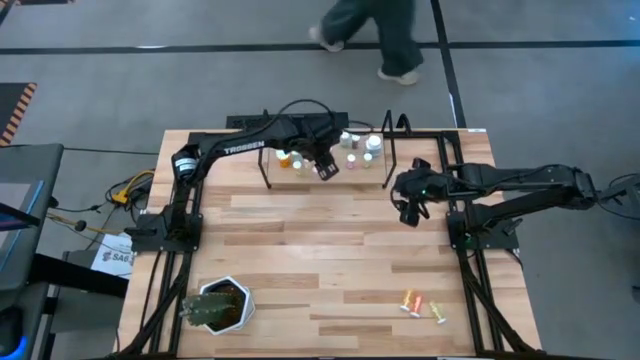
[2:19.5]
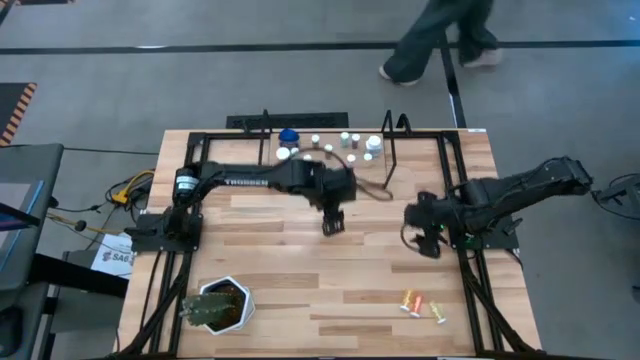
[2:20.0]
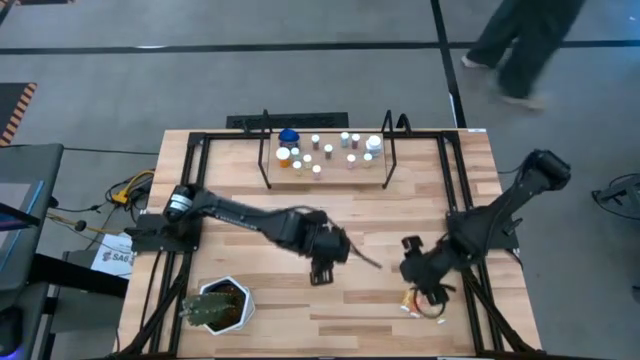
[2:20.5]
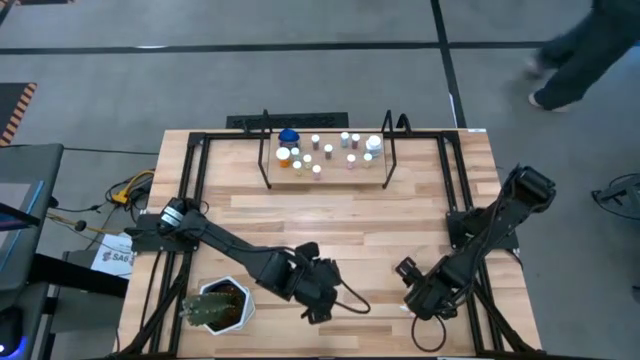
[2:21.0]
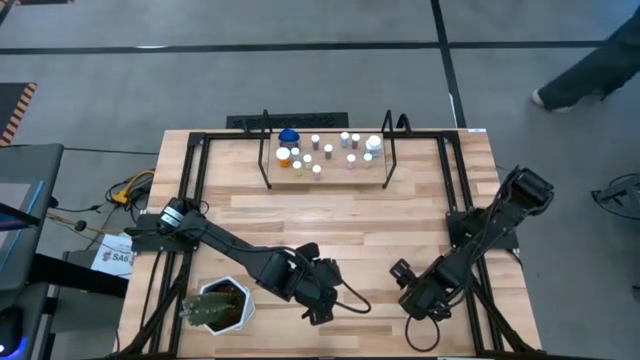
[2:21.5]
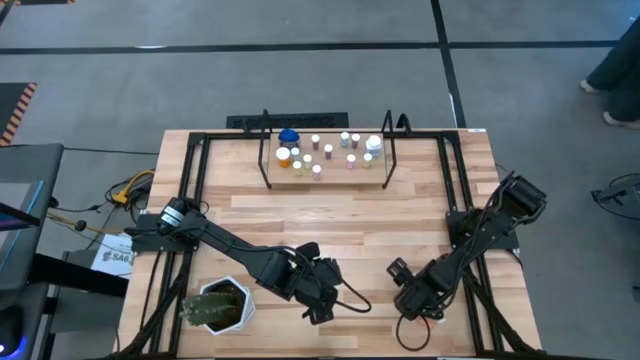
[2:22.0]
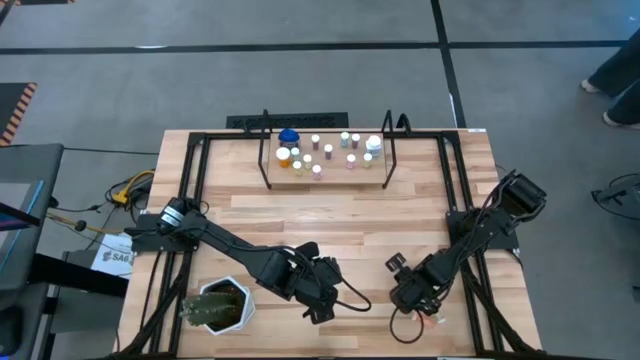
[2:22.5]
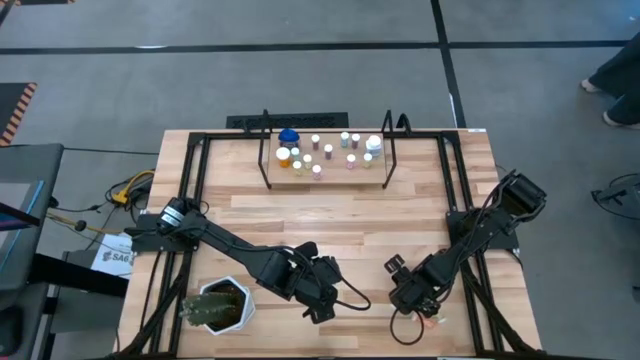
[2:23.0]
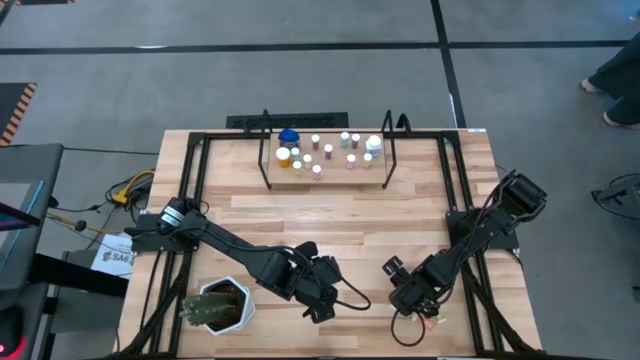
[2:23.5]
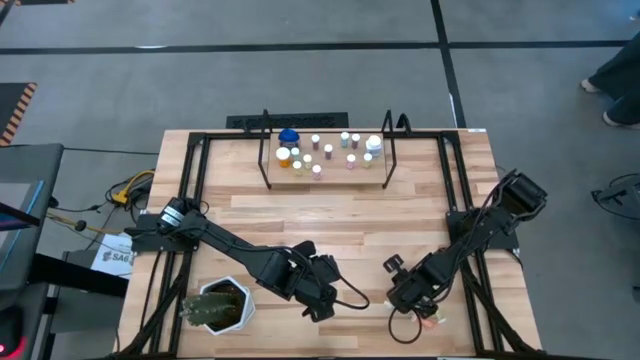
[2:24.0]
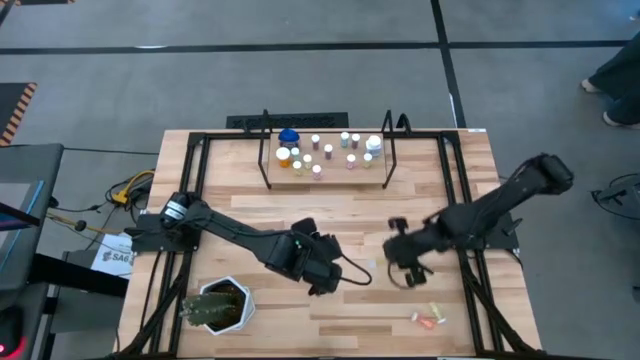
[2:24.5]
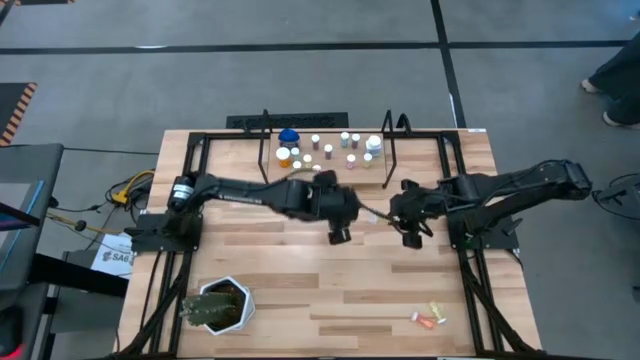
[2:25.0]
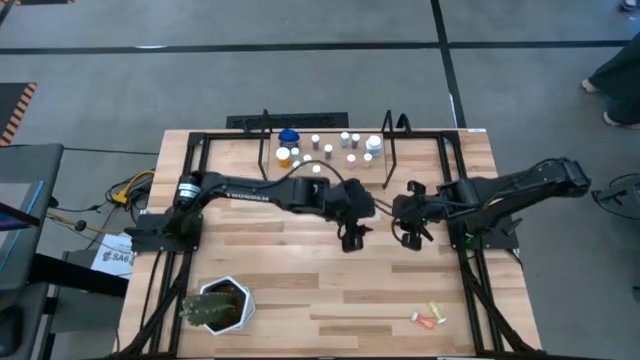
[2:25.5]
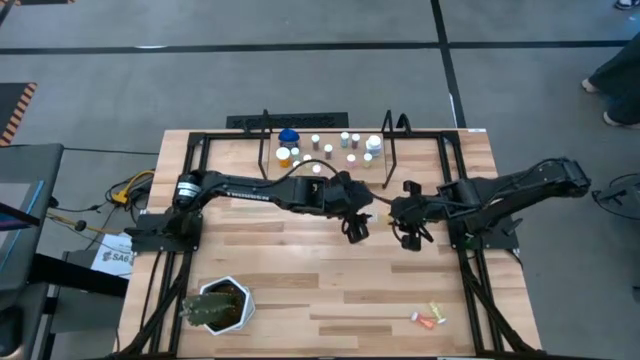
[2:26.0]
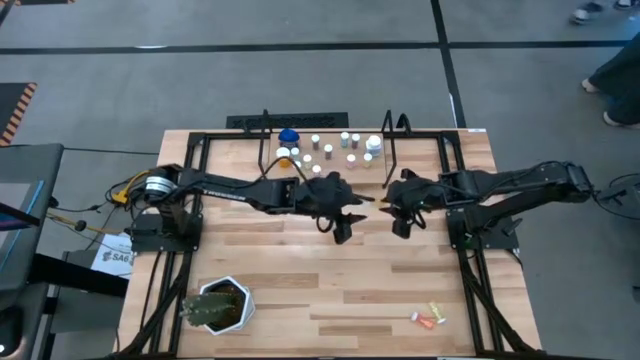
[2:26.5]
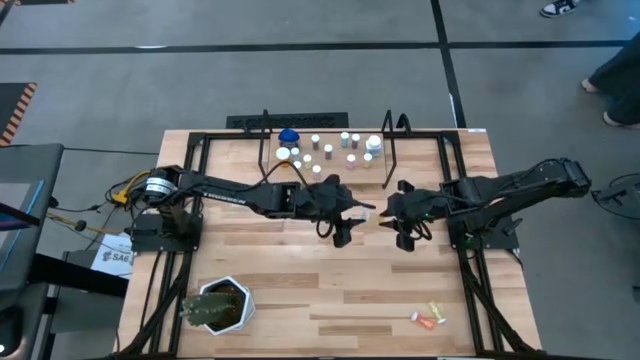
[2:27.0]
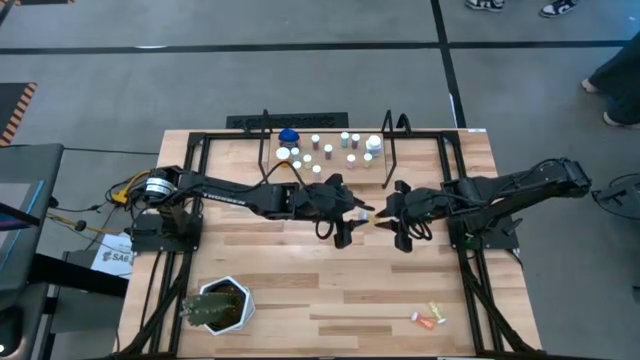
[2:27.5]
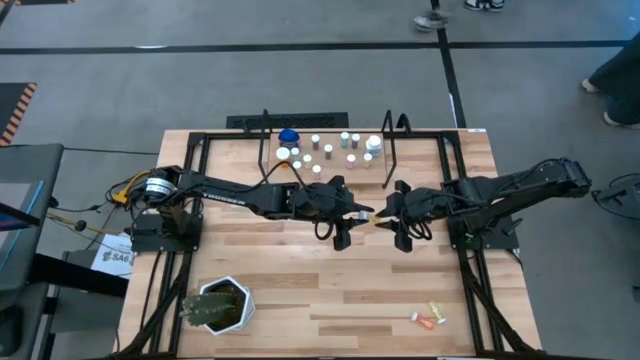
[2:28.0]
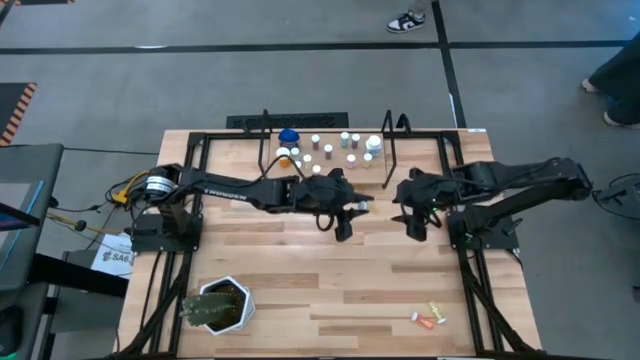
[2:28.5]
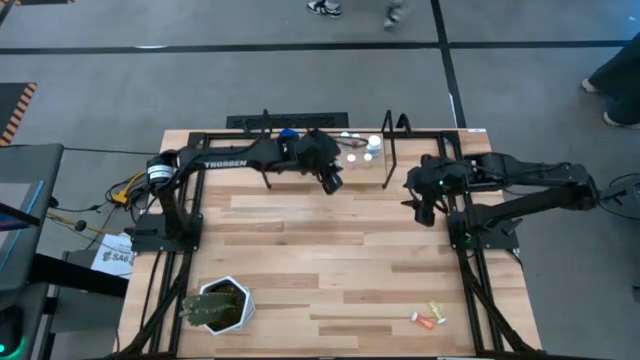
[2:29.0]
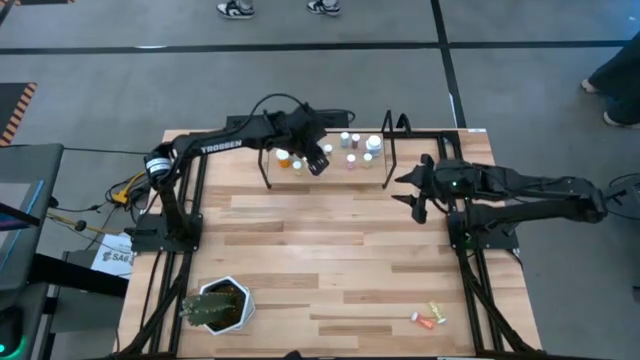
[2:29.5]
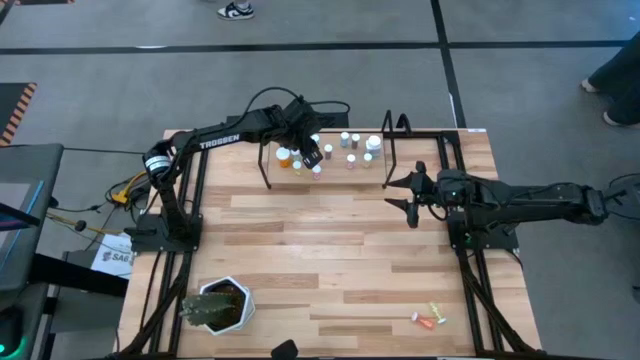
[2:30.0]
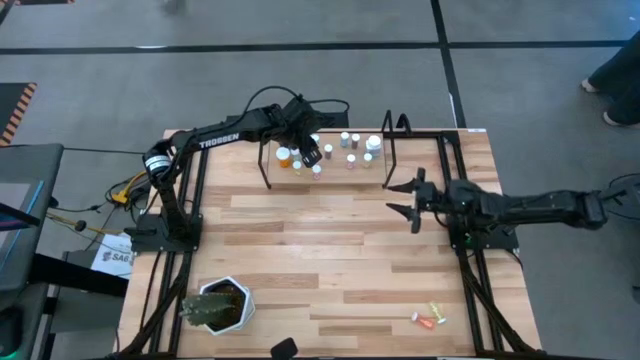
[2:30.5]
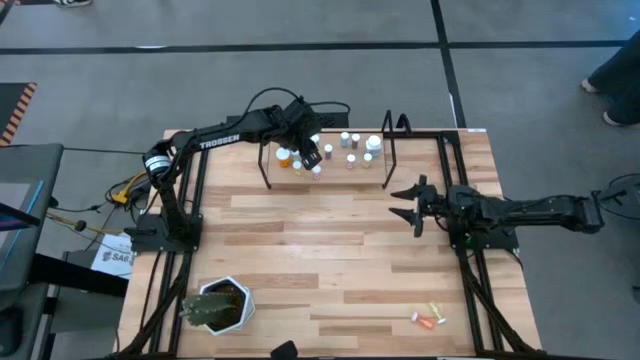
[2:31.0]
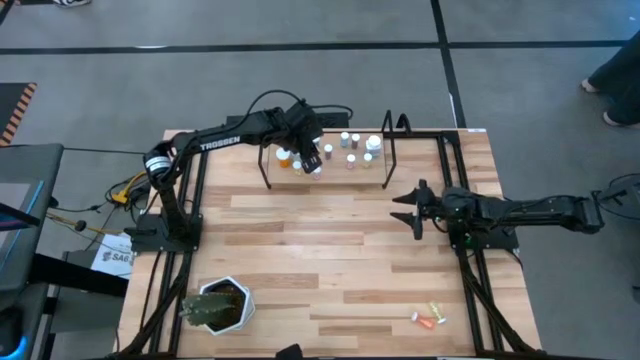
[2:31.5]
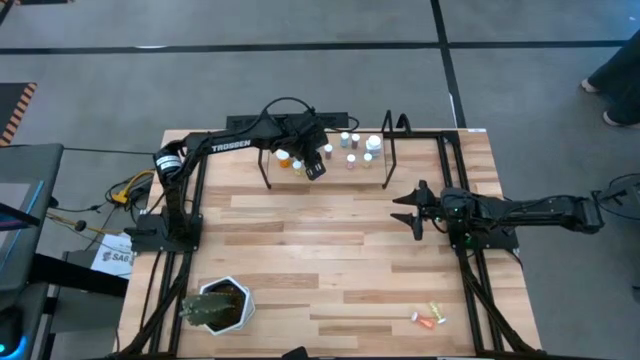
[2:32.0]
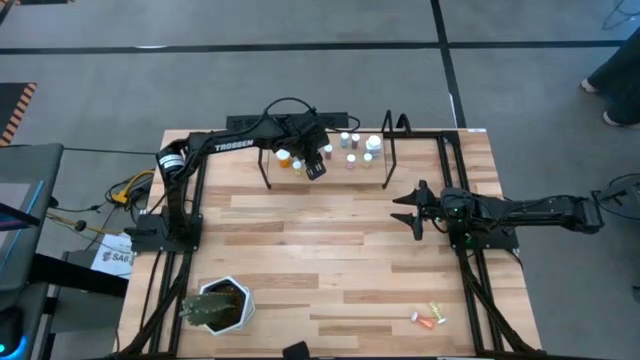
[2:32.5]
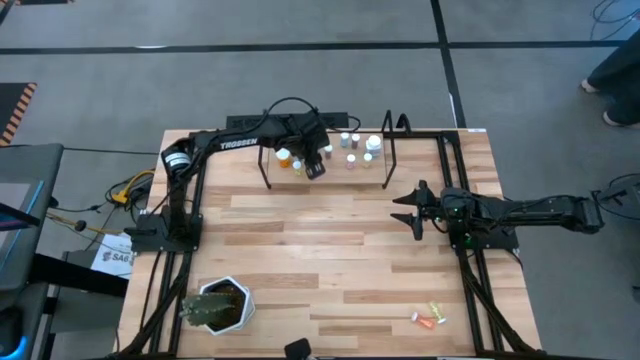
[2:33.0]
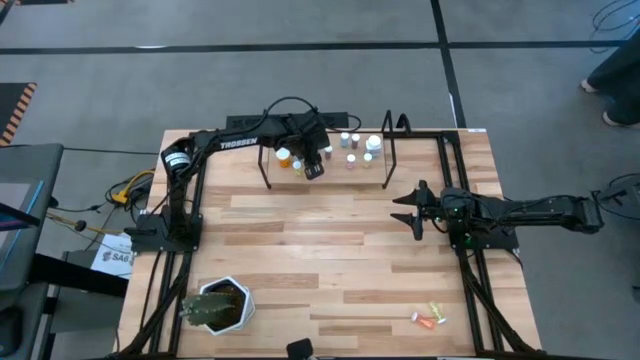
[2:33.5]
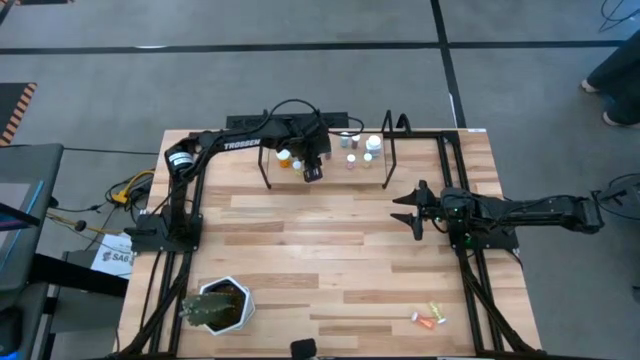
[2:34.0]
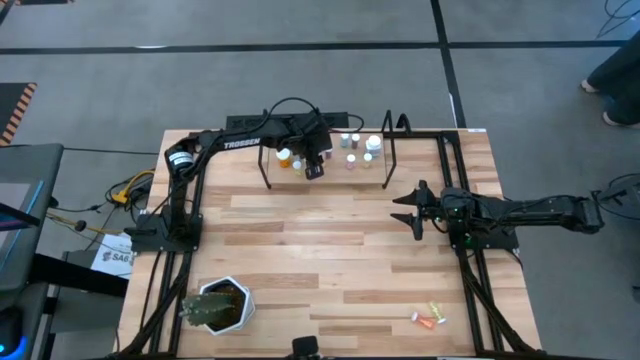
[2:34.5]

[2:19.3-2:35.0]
Task: Pick and place medicine bottles onto shelf by color
Put the yellow pill bottle on the shelf

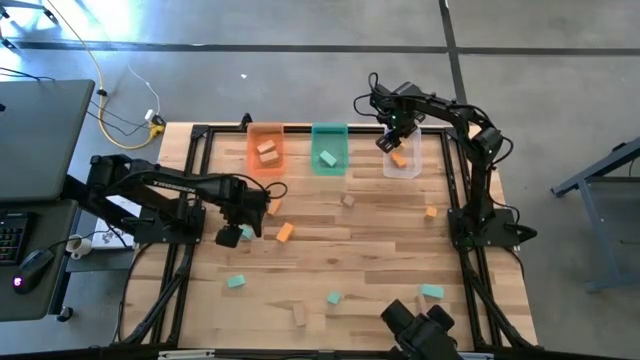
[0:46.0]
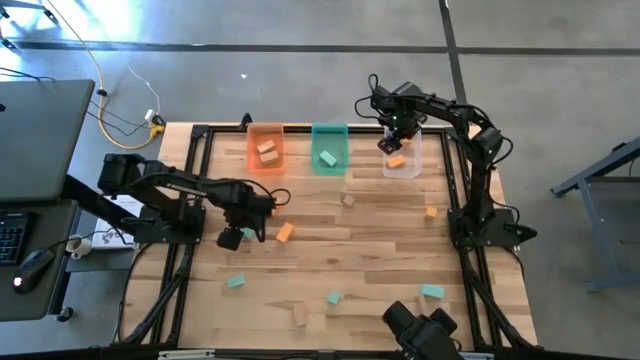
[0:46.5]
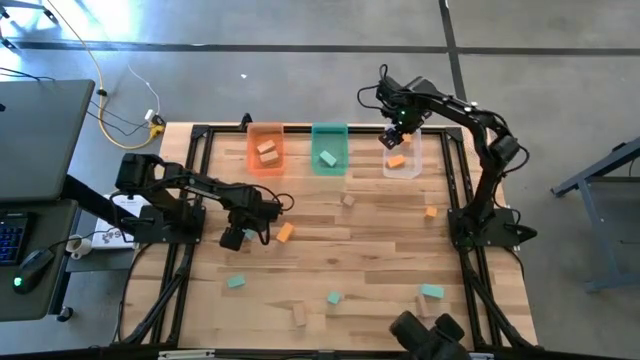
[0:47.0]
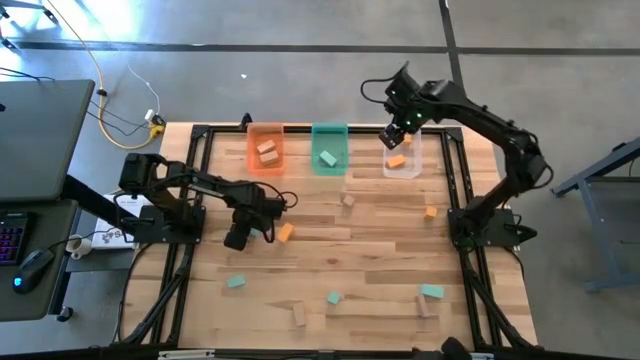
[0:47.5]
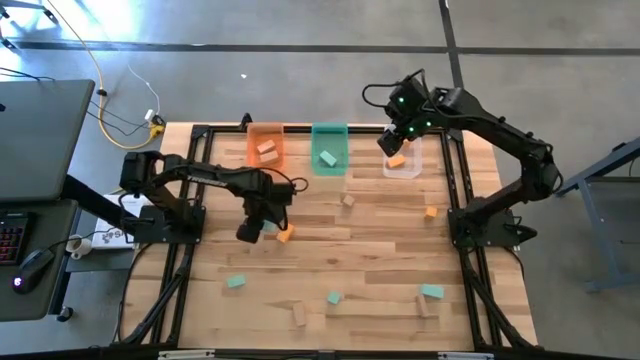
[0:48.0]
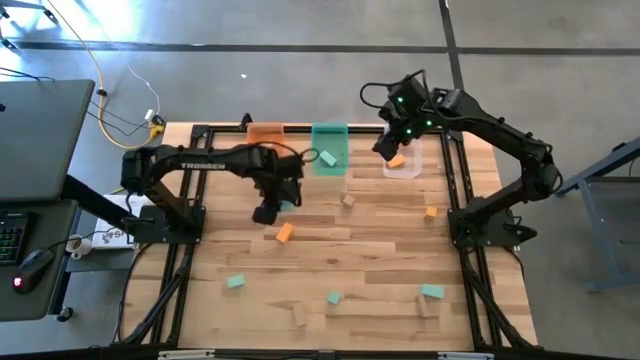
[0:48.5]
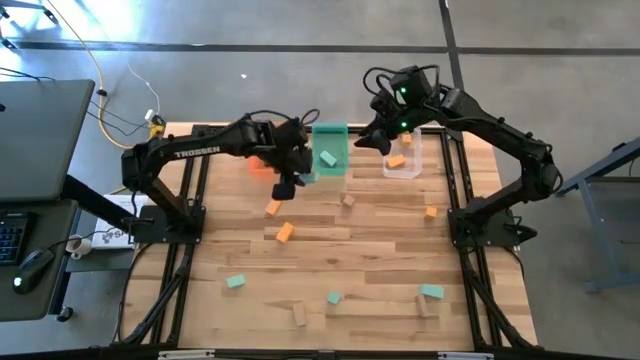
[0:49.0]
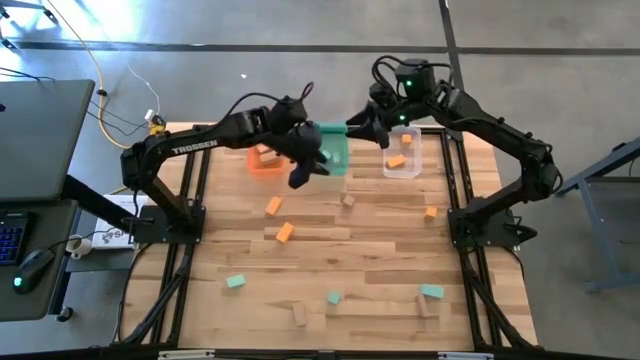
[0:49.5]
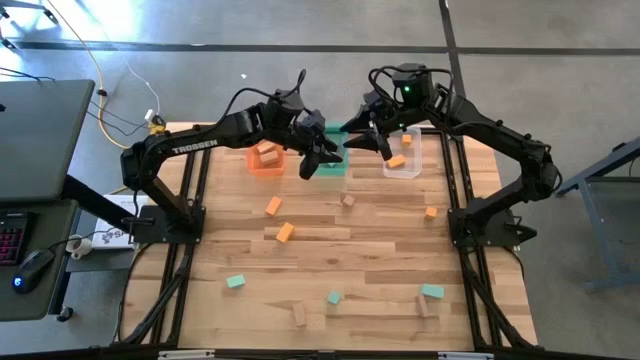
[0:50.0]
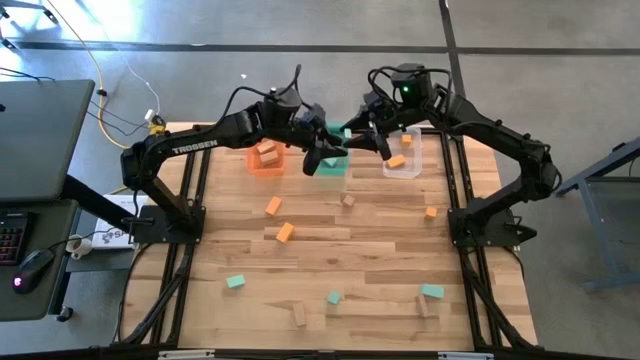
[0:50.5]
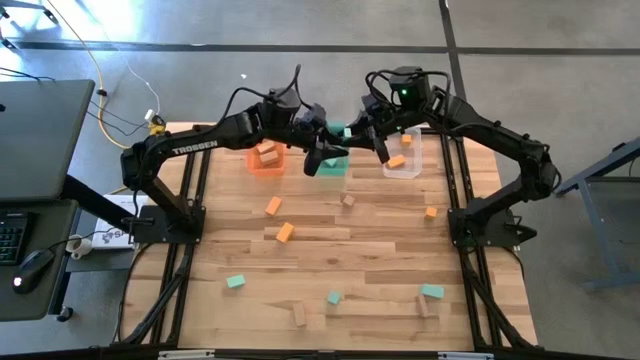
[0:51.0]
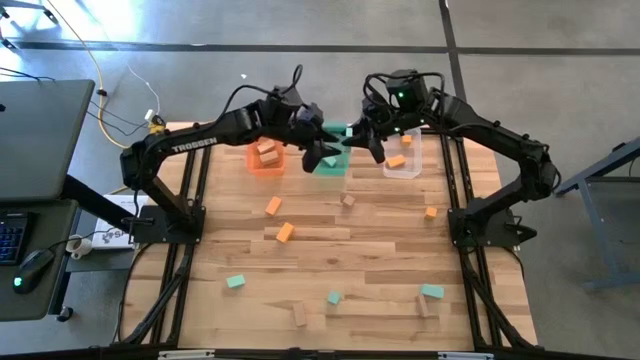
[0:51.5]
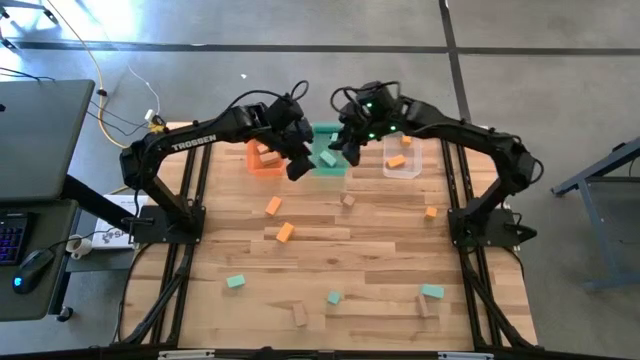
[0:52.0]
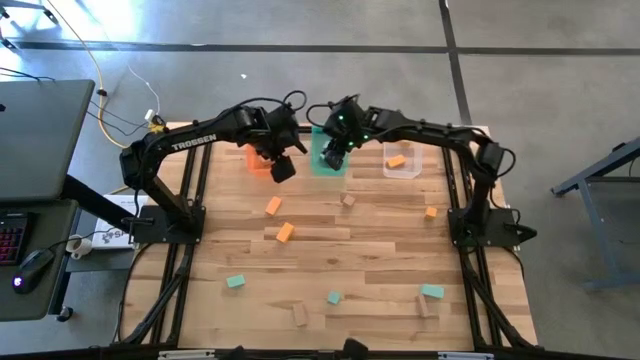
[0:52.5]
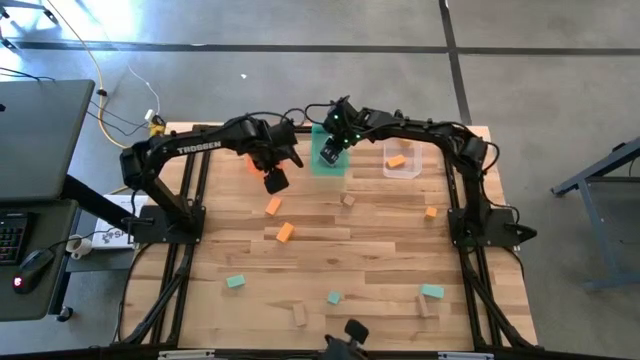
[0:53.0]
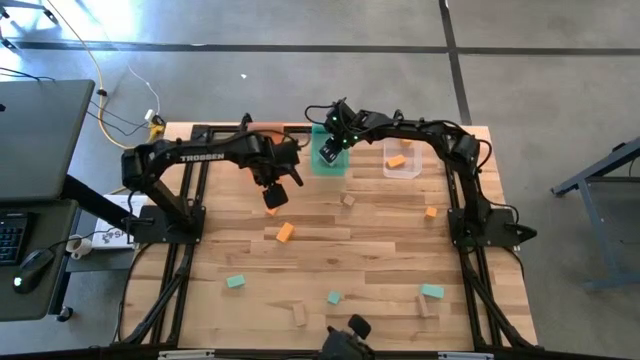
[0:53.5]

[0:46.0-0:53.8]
Task: Sort & place blocks by color
Put the blue block into the blue bin
